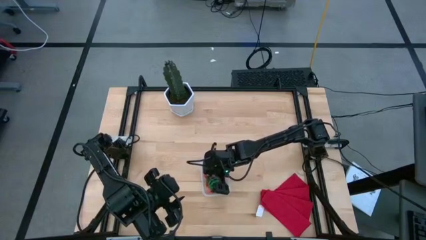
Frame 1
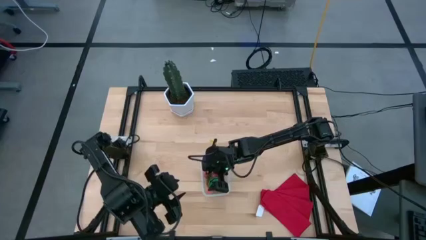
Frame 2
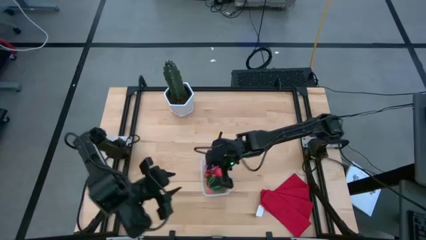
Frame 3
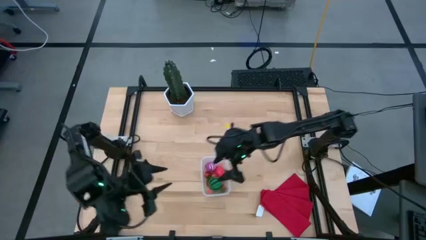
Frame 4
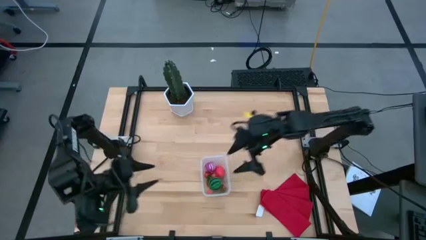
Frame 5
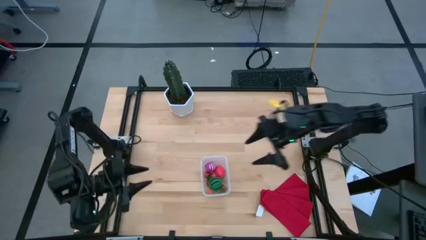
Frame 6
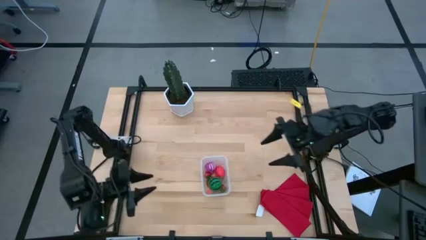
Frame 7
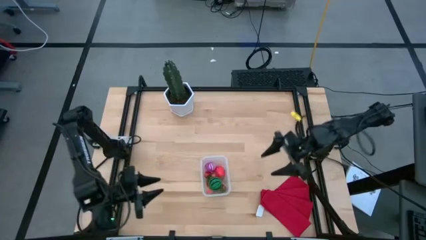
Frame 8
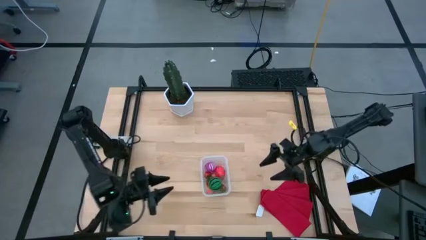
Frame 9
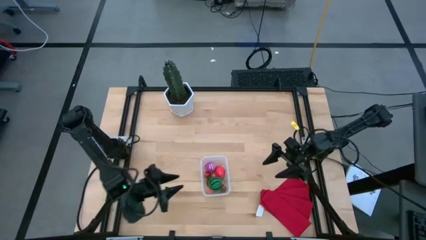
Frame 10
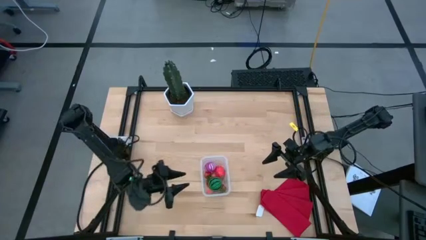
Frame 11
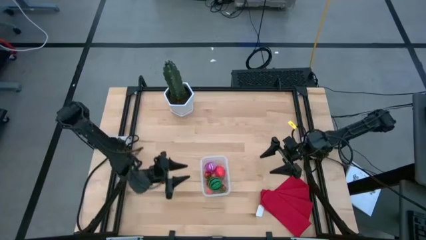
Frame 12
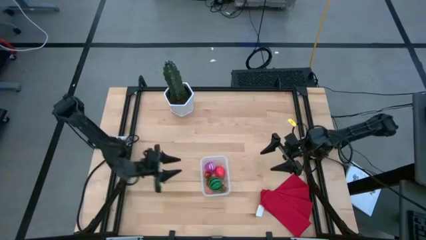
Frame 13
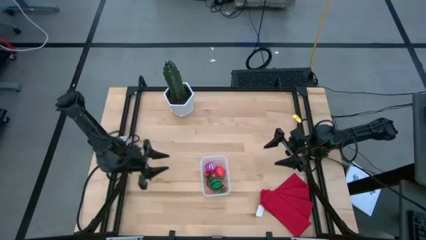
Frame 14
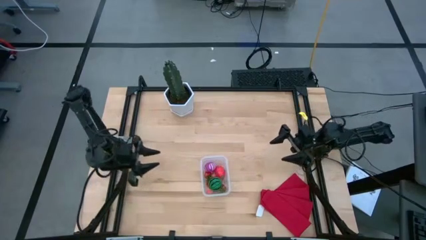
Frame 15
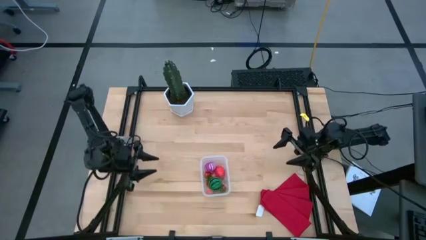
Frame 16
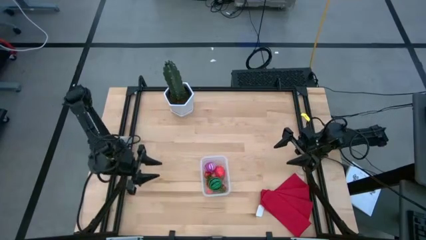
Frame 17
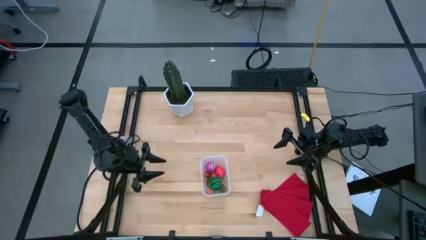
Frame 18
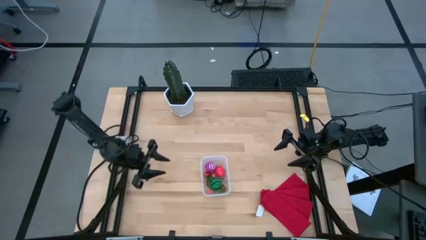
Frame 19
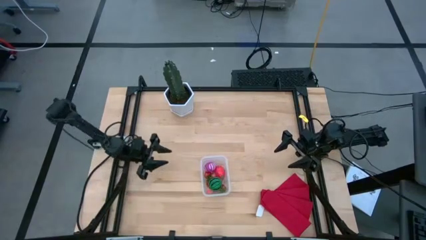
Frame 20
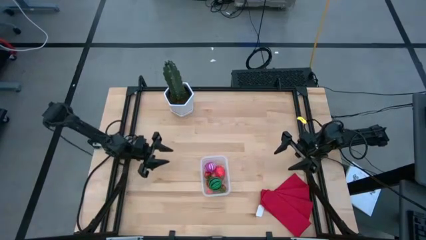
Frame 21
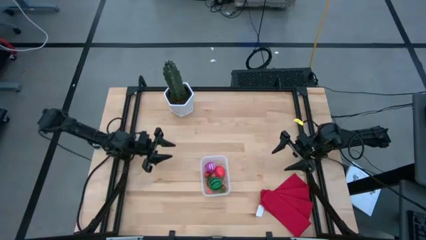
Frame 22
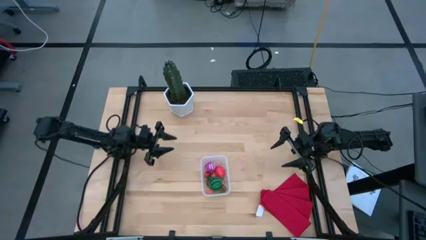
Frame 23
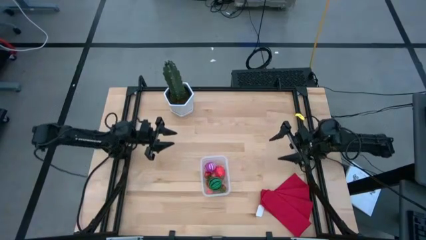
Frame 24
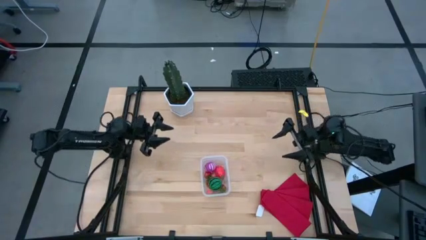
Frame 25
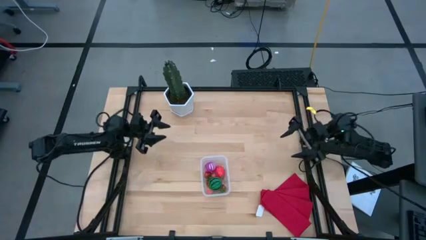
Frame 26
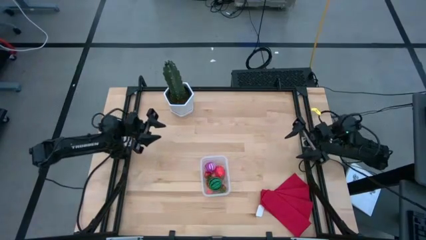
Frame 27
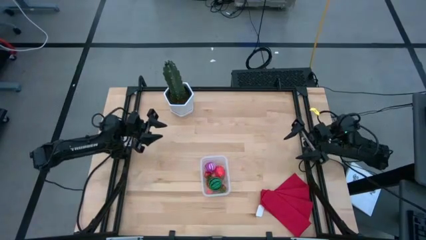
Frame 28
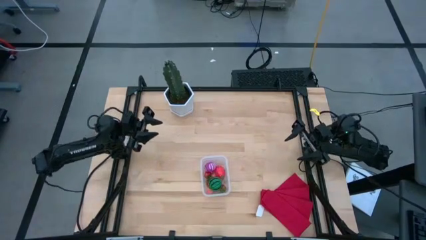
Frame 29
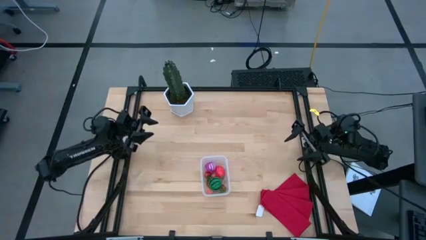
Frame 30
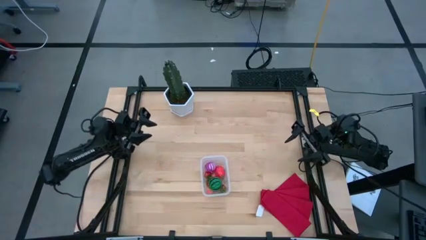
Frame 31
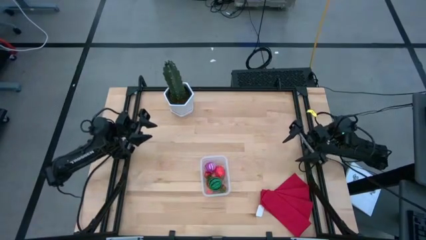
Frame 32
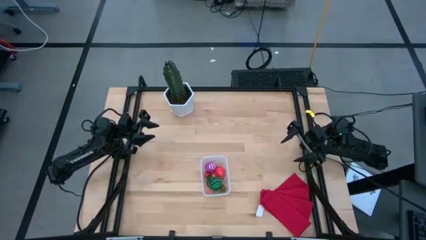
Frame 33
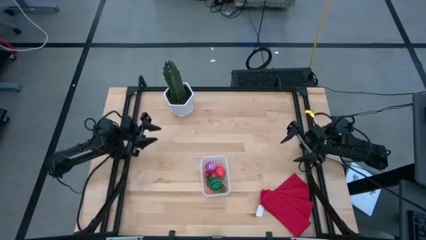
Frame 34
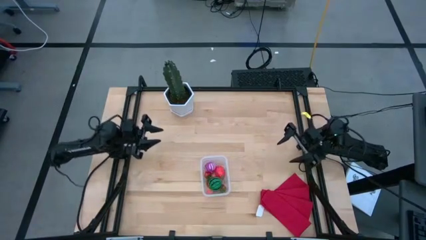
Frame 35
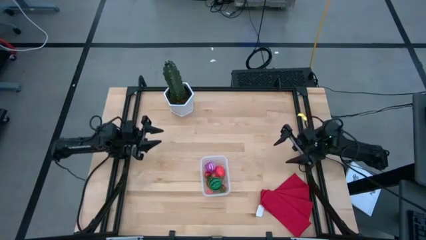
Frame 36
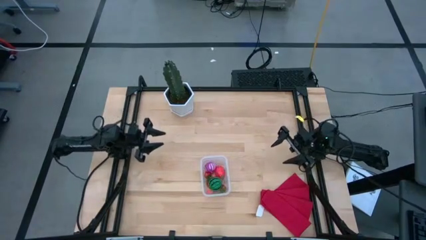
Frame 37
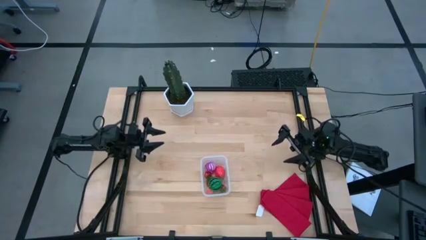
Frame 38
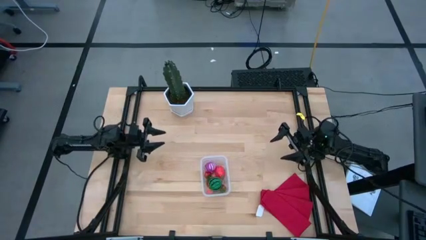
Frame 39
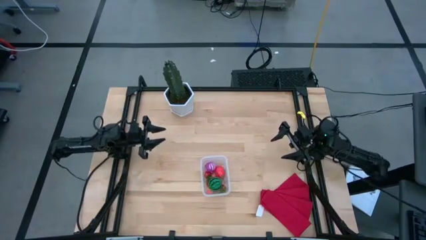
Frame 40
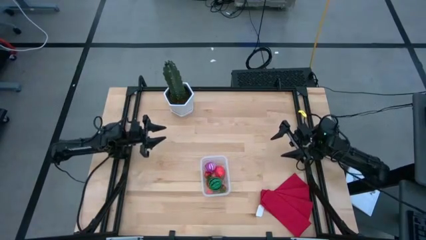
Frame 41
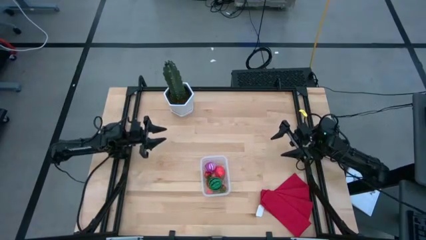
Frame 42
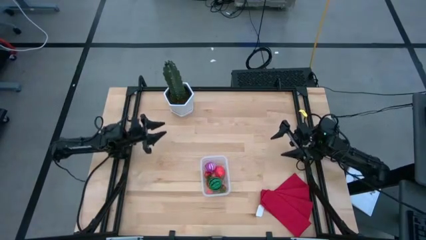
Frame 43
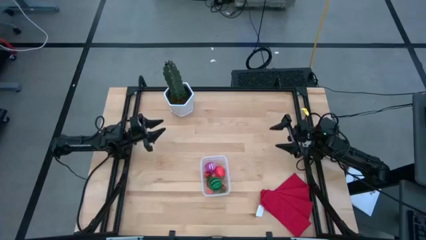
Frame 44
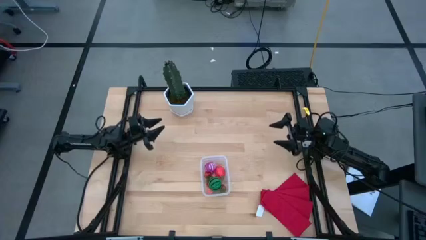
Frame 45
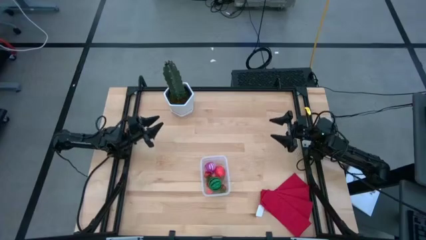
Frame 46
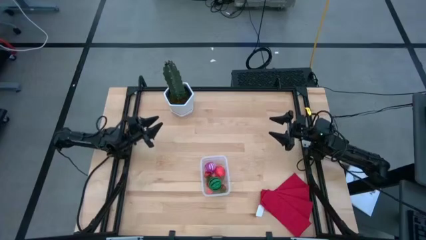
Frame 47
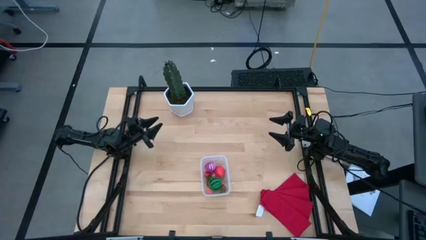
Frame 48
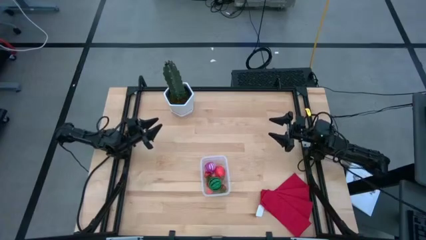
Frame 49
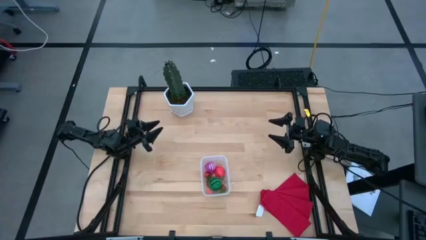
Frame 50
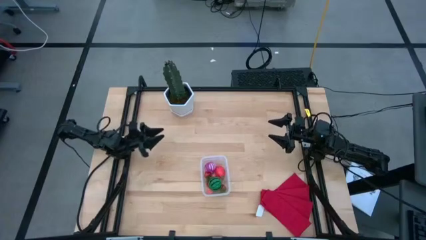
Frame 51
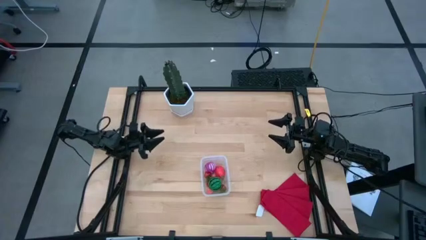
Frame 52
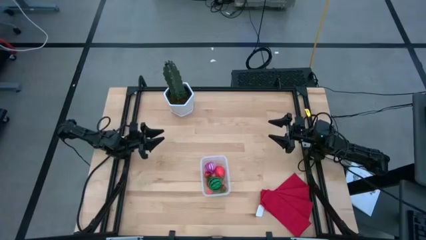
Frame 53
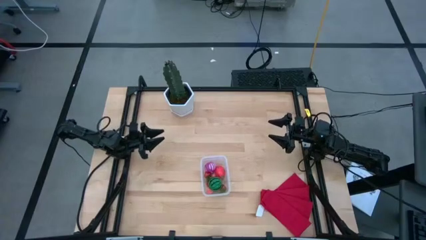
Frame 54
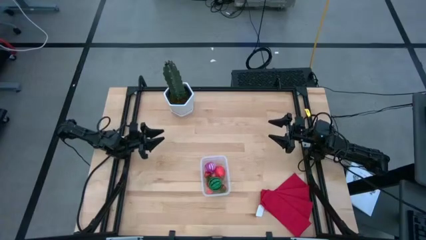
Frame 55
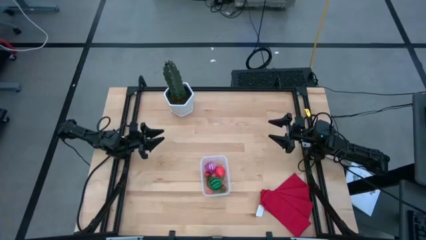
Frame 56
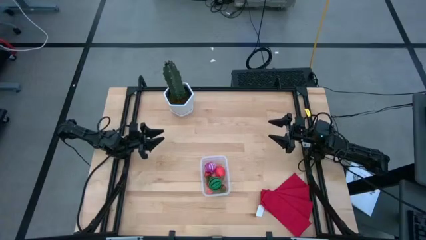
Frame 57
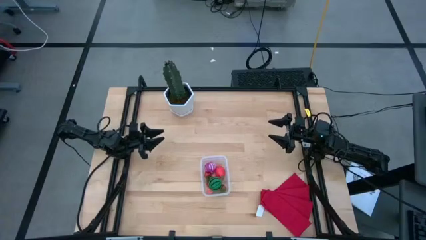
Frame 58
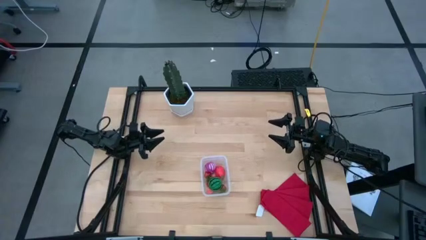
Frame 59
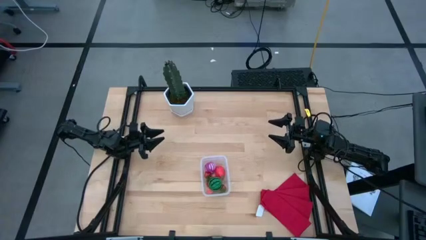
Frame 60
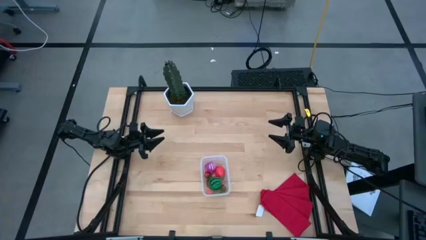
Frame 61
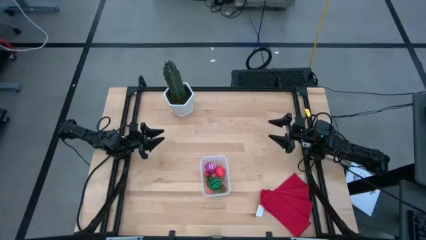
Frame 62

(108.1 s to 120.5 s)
Task: Pick and placing Produce into tupperware
Return to Home Position

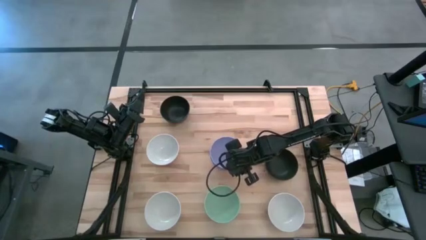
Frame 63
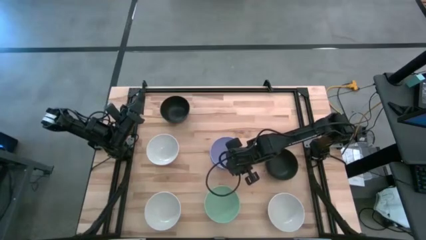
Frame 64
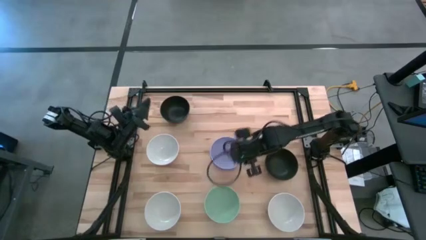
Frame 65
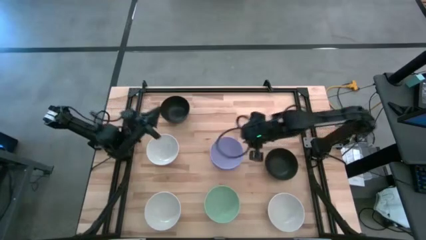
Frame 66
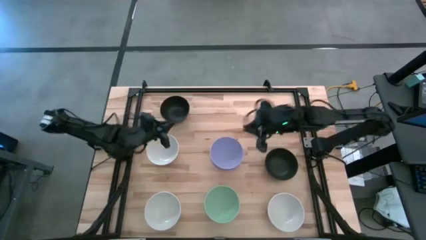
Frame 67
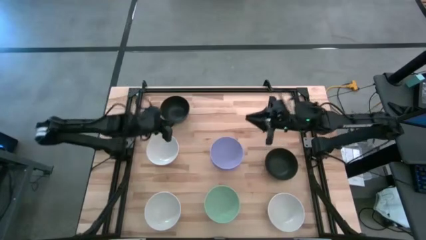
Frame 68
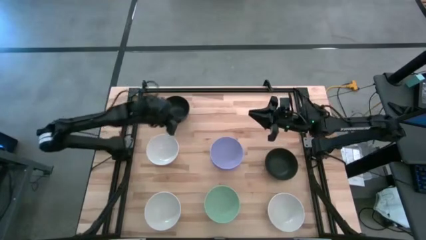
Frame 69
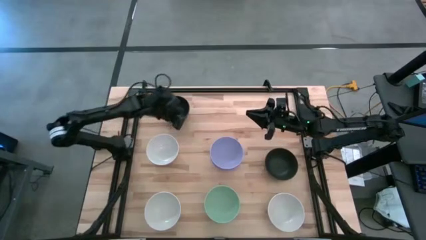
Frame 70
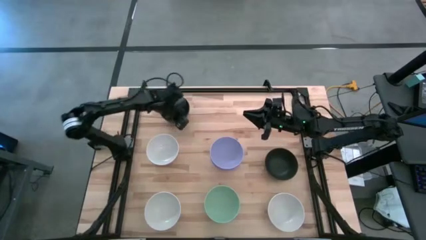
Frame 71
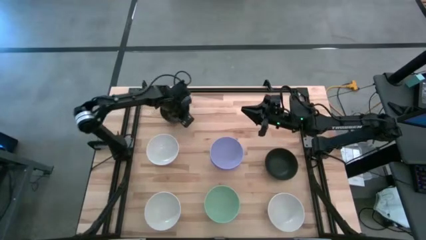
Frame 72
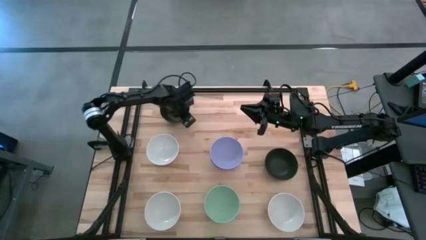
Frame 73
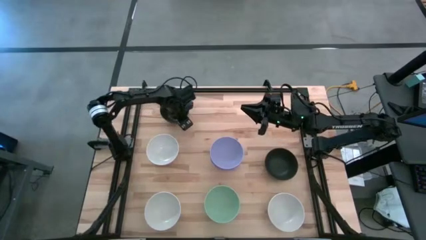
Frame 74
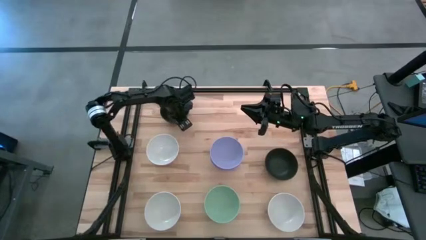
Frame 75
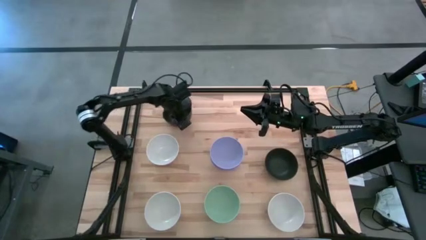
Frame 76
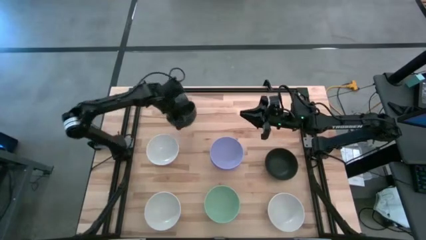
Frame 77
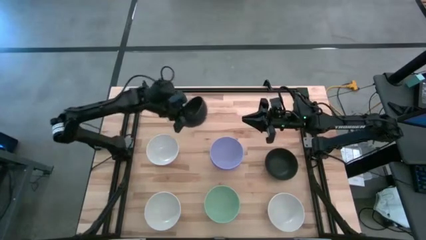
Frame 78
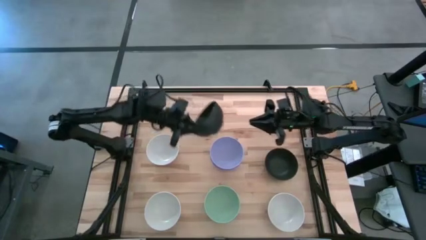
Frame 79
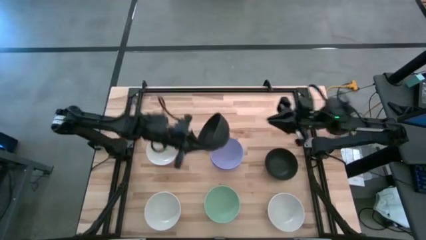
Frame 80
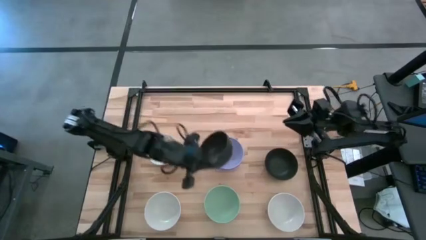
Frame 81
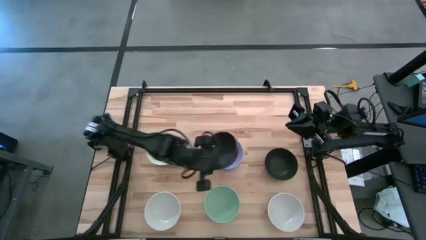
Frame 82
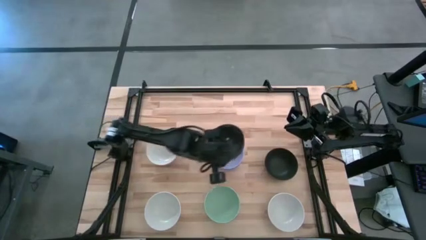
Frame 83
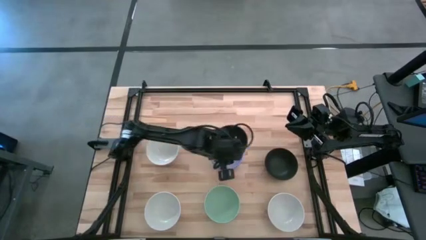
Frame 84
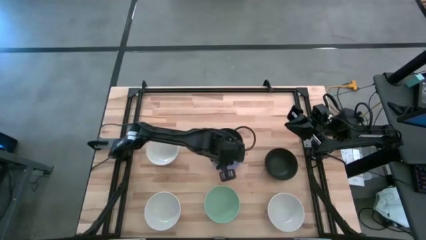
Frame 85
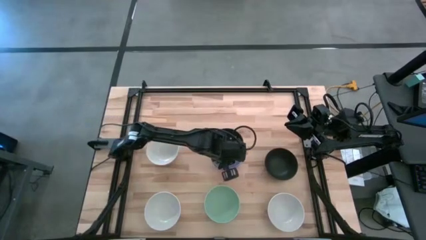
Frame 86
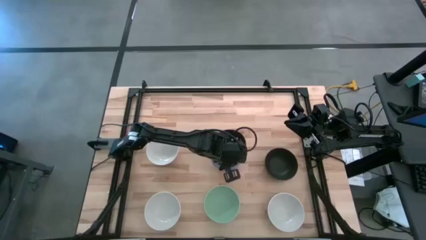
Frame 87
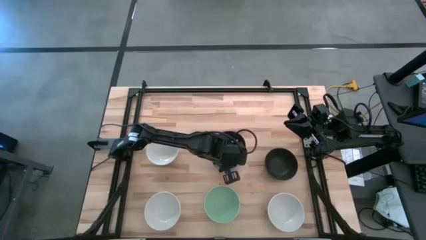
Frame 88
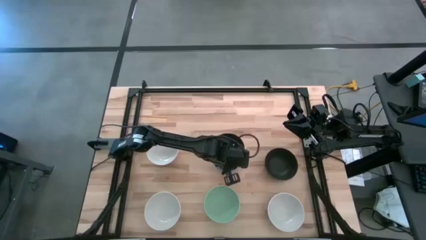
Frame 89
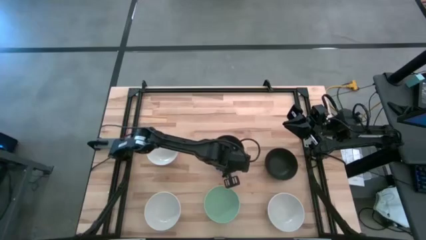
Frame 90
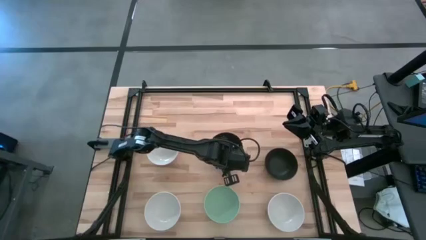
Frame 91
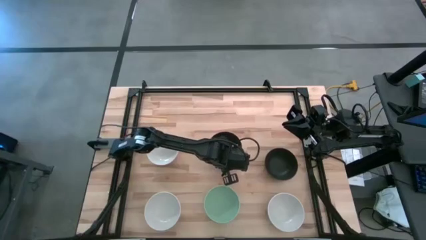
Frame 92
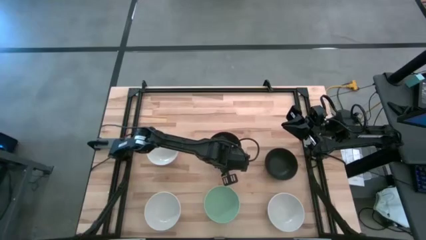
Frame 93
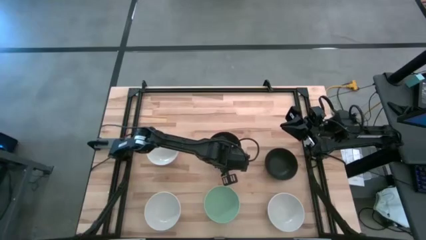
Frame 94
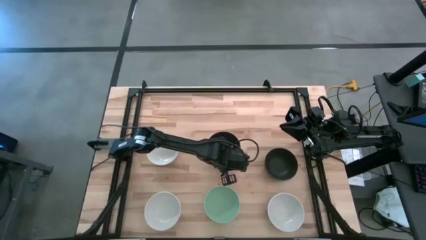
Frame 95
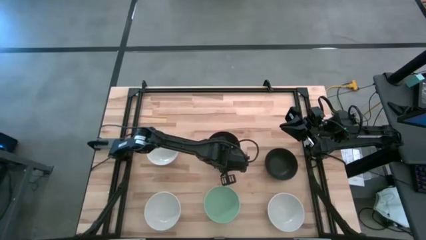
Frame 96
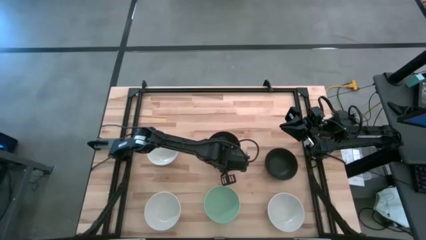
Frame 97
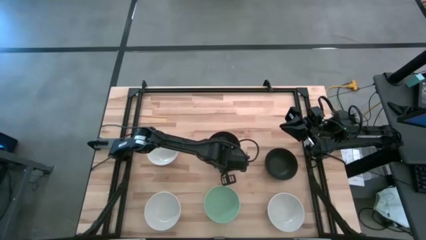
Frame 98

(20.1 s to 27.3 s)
Task: Nest bowls inside each other
Stack the top black bowl into the purple bowl
